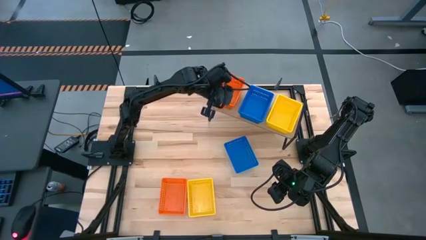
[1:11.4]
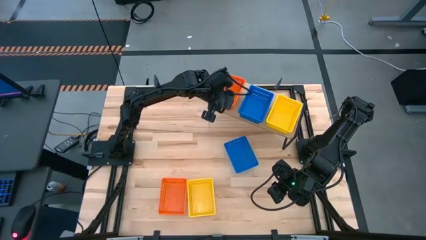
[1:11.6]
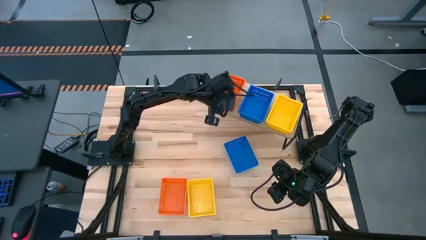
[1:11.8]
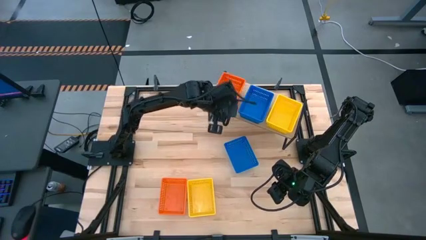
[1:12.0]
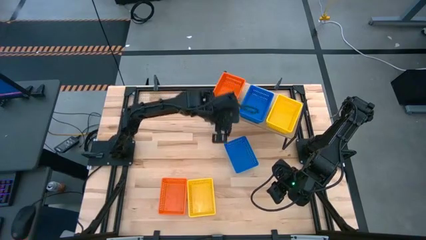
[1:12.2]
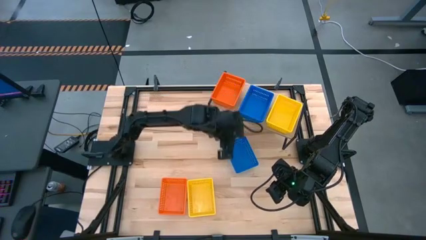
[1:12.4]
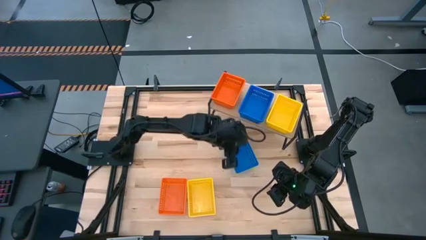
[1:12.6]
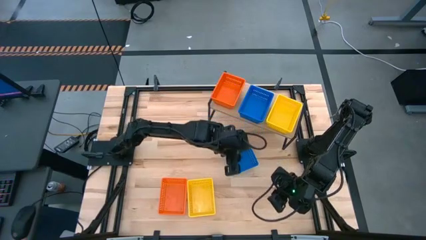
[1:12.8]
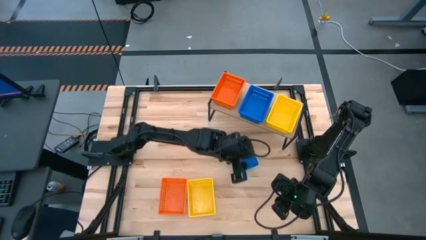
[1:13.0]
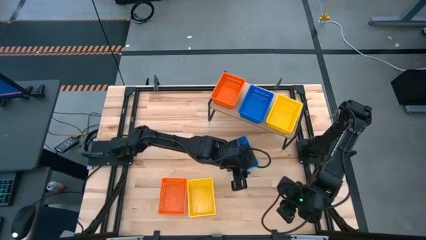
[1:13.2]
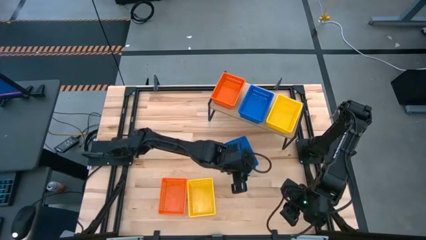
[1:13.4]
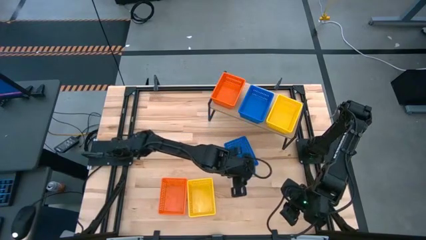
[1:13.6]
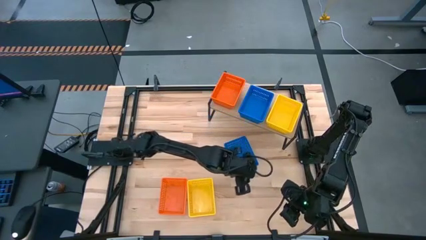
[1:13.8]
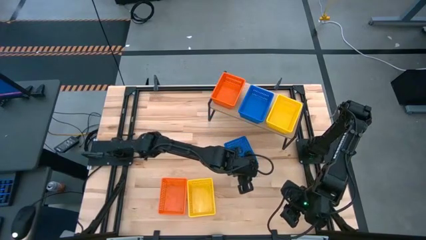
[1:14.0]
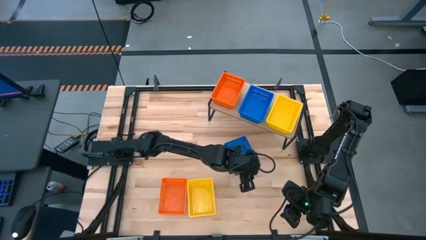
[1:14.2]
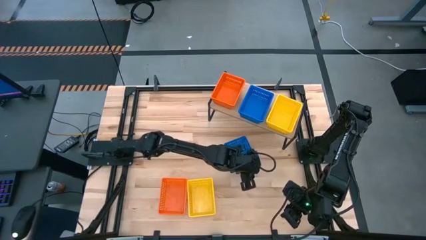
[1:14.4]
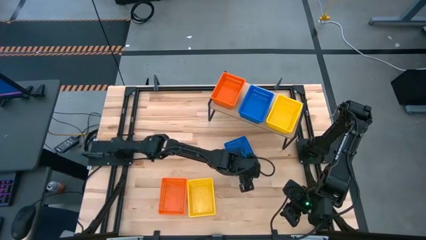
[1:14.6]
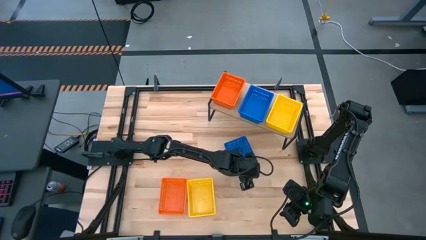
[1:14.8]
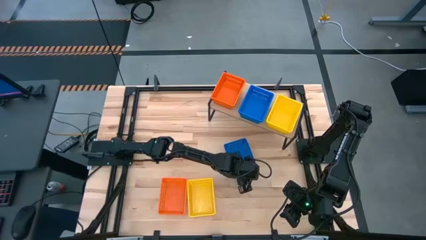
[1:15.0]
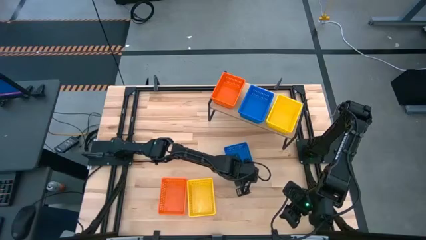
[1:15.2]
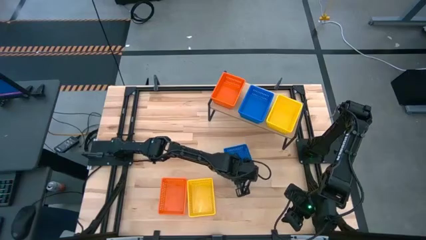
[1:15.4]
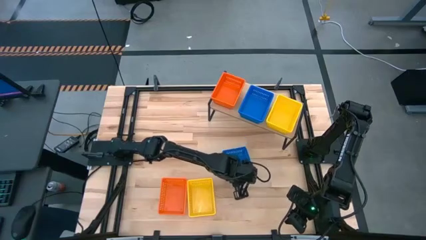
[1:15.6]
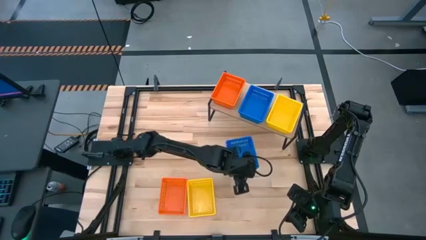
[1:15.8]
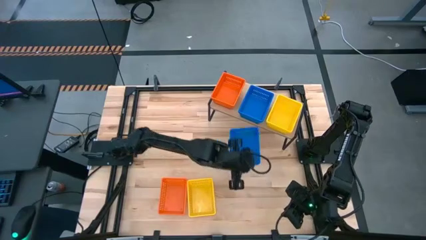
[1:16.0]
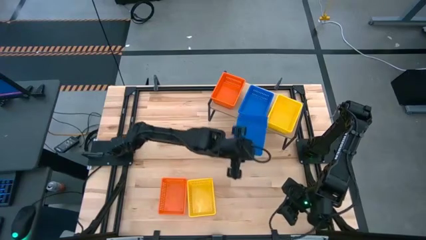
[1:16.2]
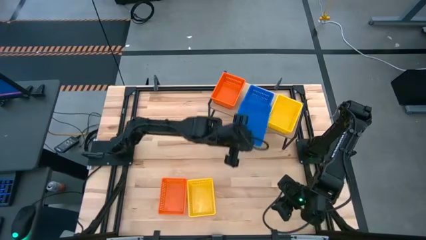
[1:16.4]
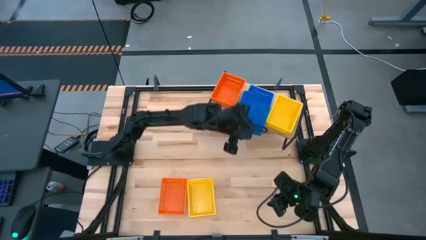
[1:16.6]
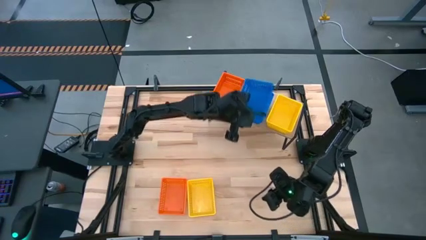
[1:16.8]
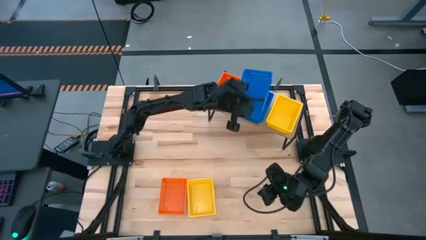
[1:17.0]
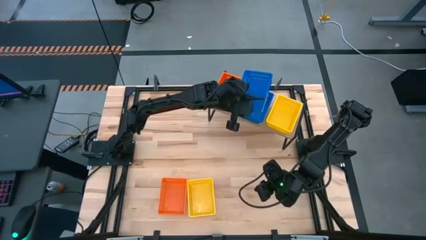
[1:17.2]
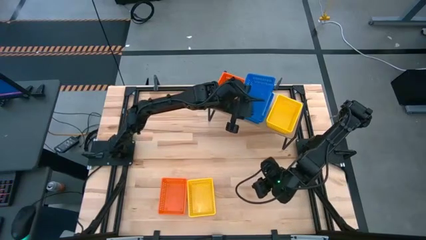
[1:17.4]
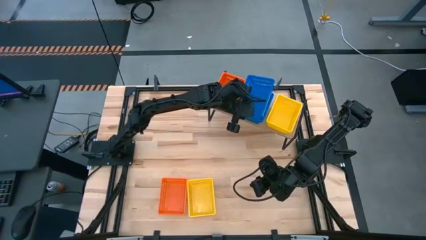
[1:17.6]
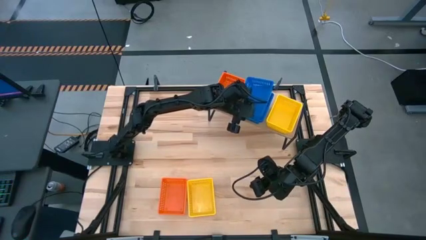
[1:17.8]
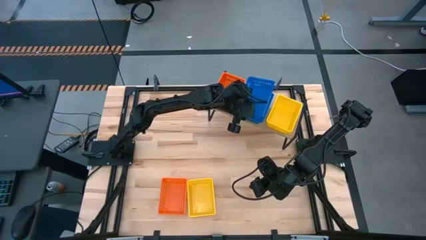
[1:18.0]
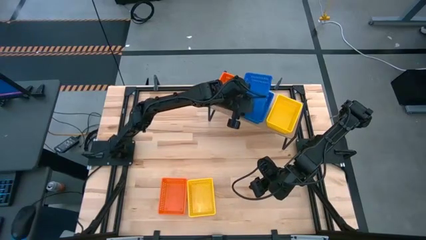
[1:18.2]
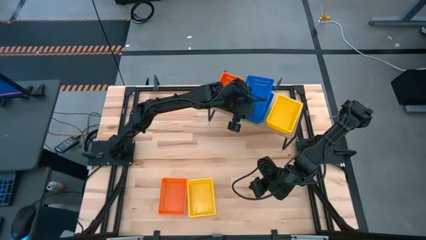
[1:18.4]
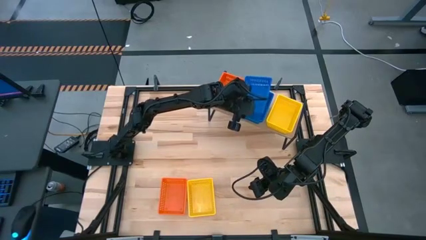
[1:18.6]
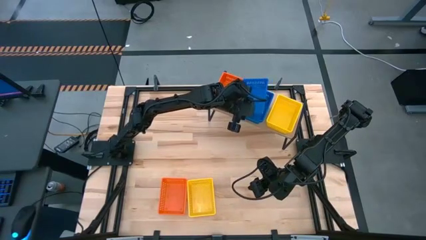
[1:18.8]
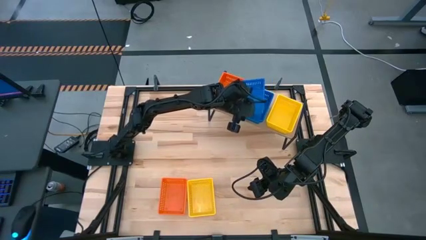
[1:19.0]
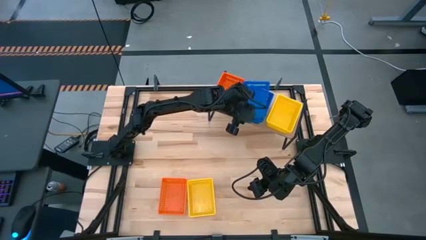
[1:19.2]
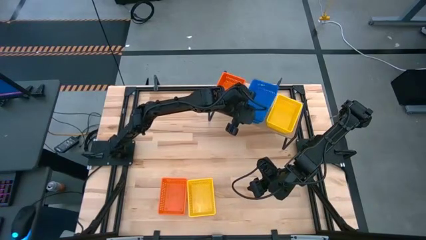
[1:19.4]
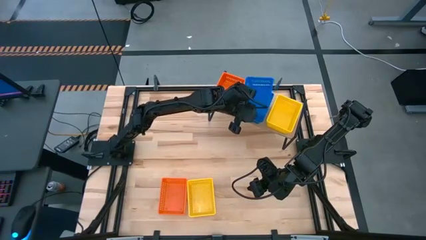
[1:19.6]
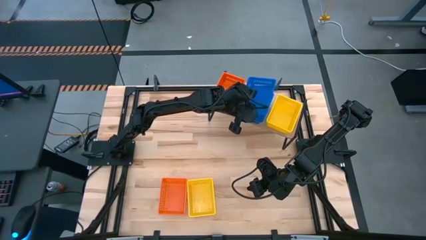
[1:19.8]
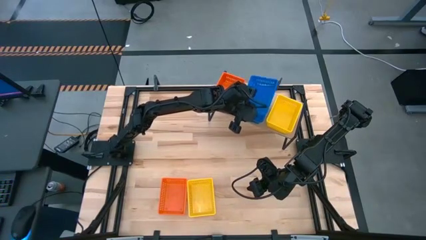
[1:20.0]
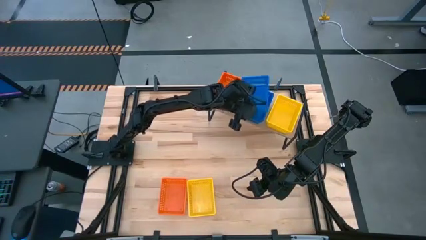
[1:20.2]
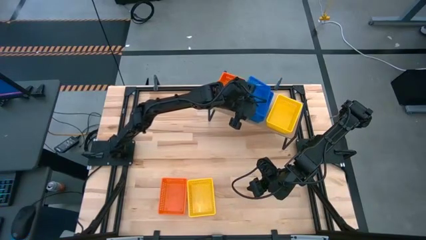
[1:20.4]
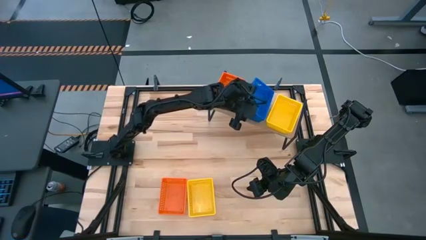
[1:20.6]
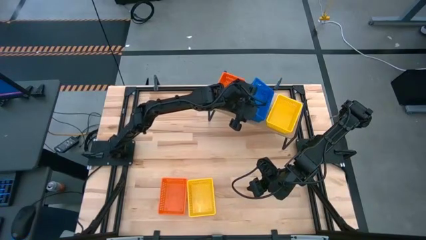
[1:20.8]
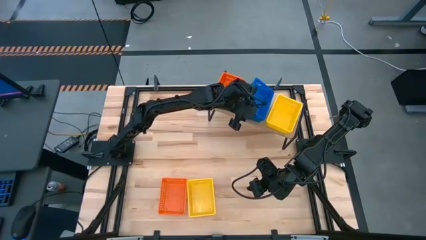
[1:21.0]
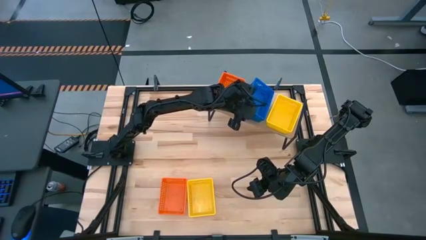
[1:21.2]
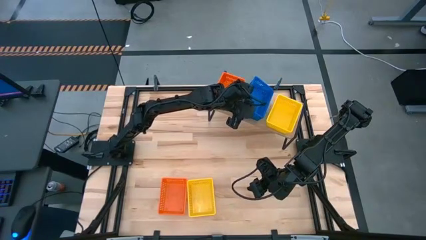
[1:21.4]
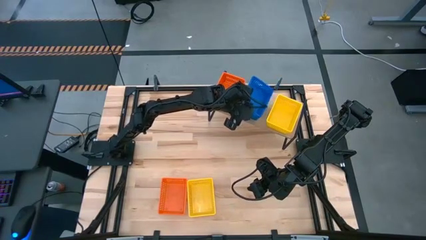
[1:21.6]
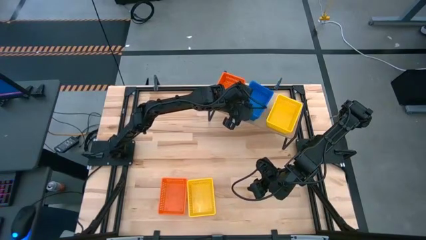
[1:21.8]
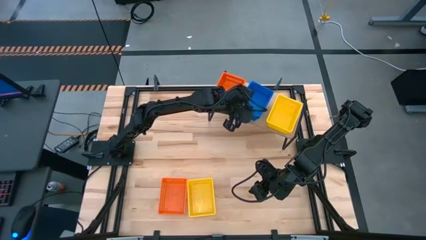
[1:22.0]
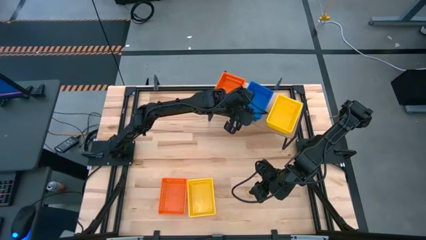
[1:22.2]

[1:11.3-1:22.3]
Task: Stack baskets on shelf by color
Stack the blue basket on the blue basket on the shelf

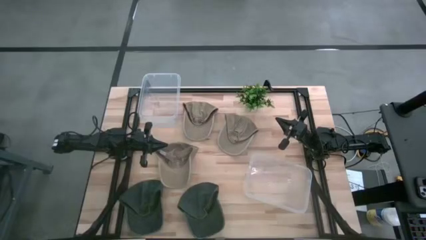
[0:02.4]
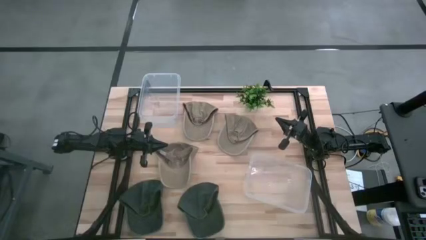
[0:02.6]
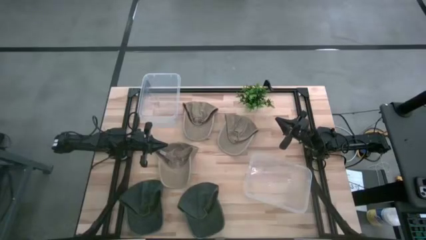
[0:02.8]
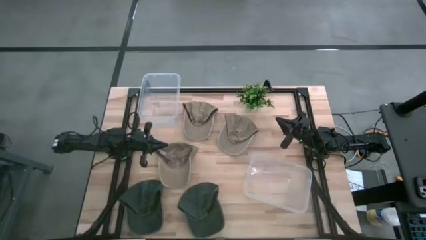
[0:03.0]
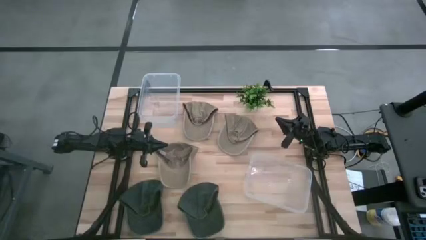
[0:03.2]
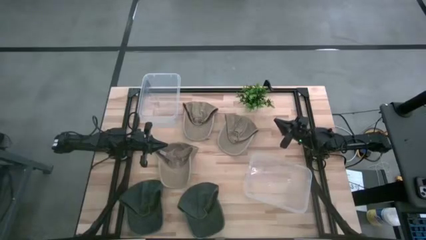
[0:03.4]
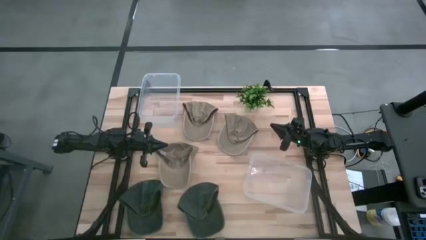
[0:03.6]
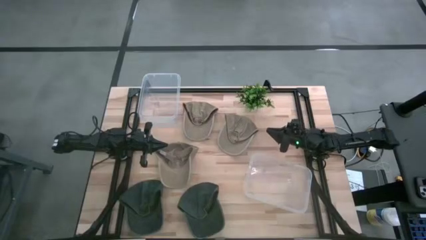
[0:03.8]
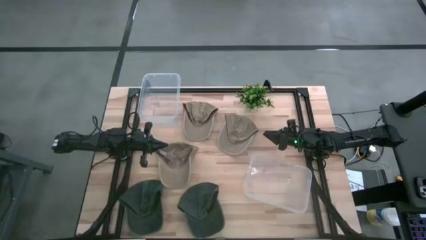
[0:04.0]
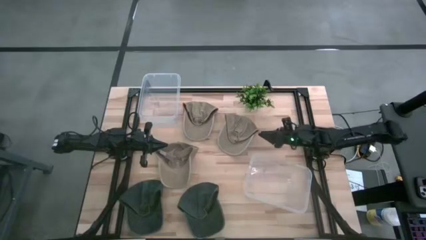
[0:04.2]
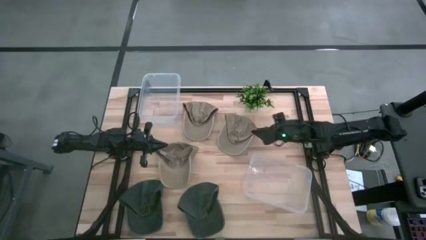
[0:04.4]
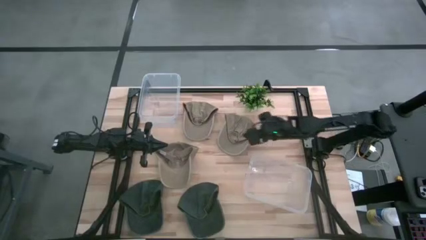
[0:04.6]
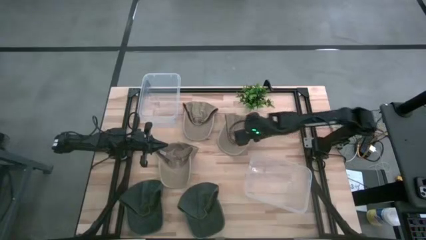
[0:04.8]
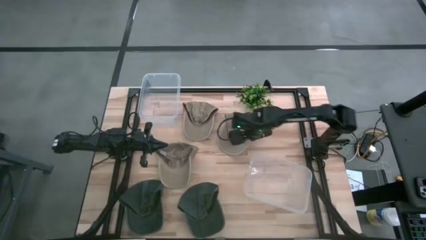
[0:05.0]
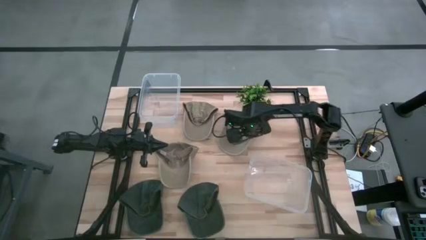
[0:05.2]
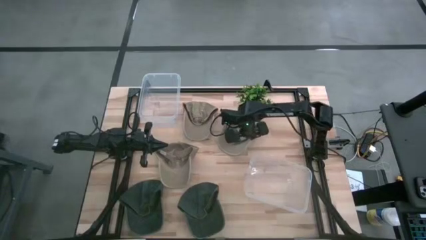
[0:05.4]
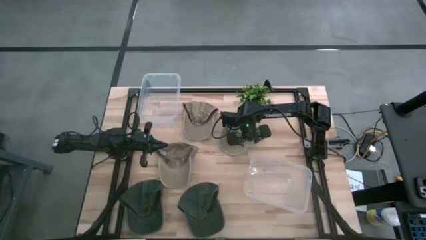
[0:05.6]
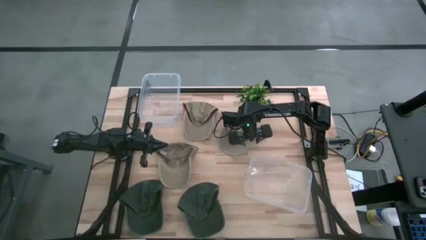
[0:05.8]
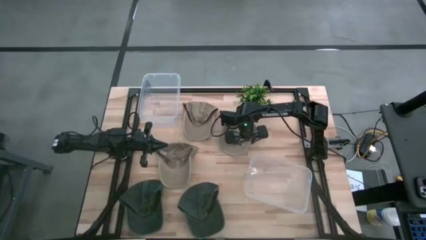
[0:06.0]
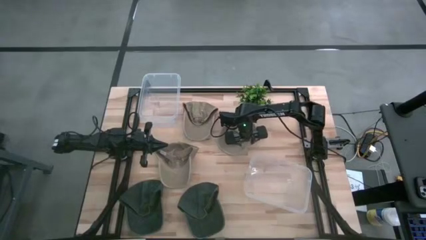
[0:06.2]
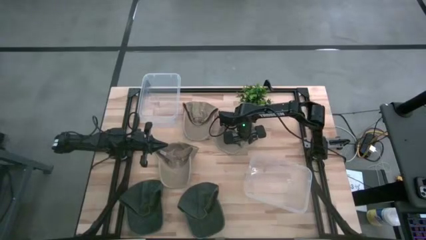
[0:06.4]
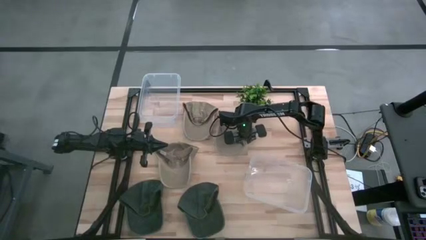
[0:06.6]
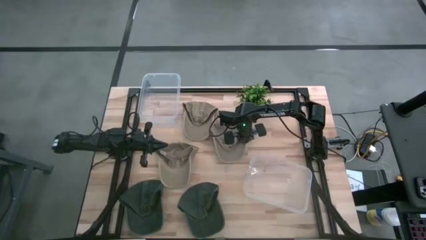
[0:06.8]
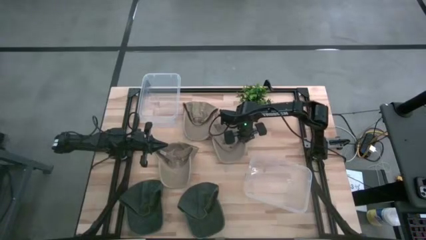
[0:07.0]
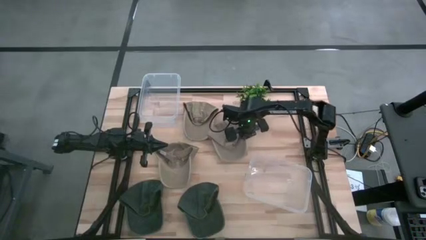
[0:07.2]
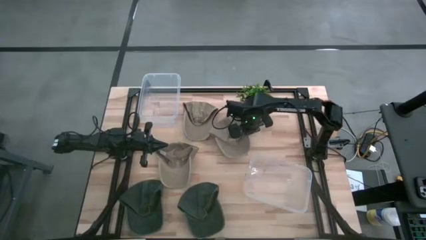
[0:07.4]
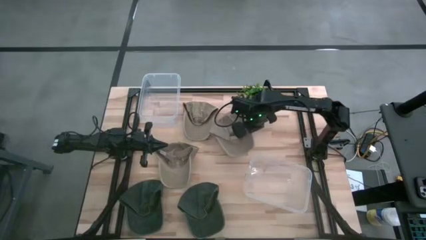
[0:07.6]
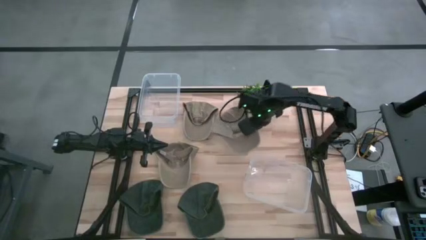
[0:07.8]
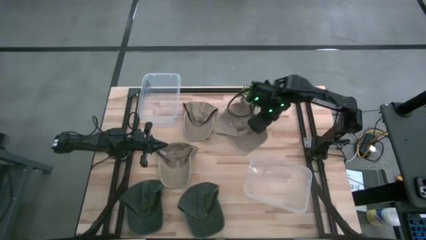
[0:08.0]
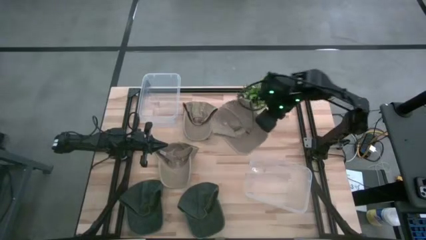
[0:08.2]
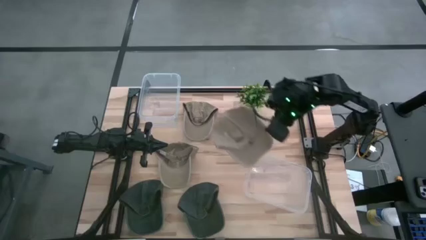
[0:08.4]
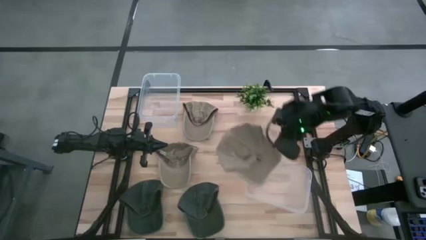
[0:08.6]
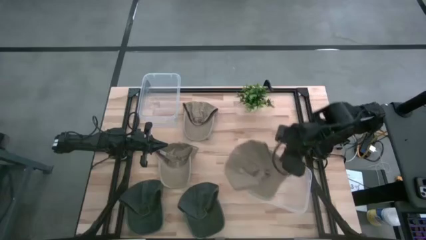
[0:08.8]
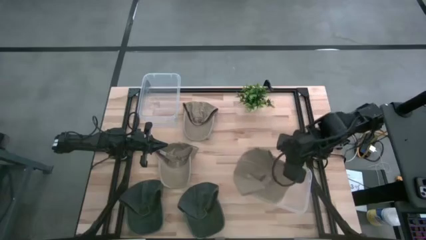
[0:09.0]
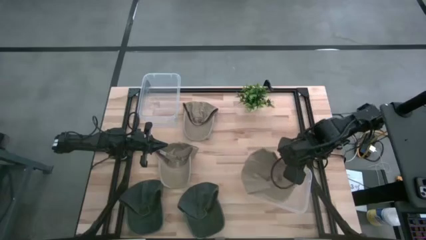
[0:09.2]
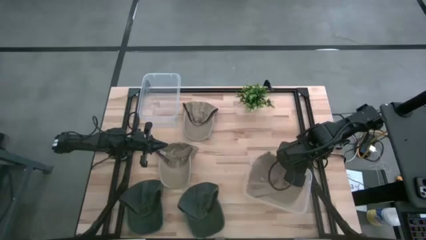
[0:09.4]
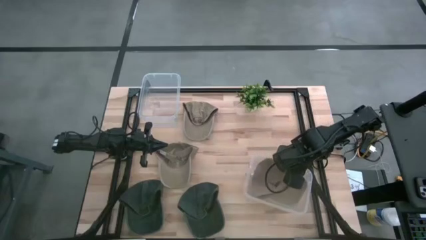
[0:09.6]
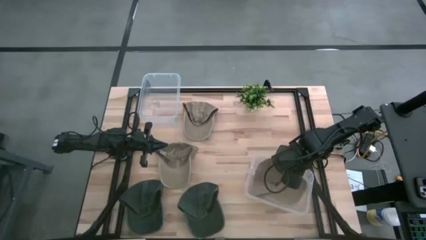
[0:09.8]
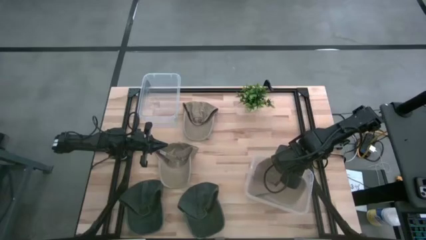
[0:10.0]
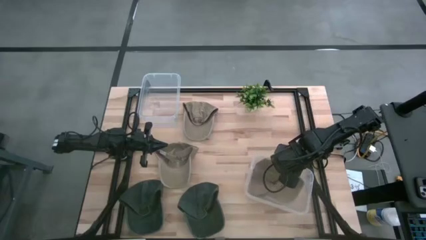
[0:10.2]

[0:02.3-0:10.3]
Task: Pick & Place hat
Put the top right brown cap into the bottom transparent bin
